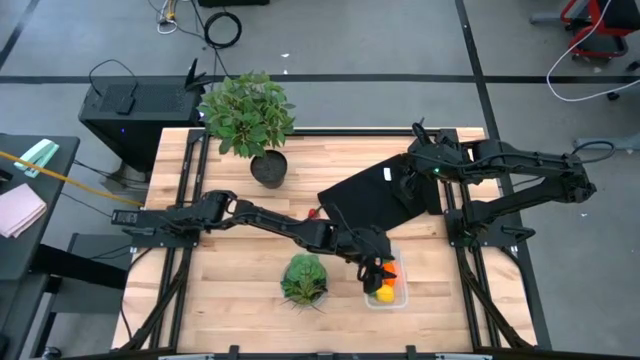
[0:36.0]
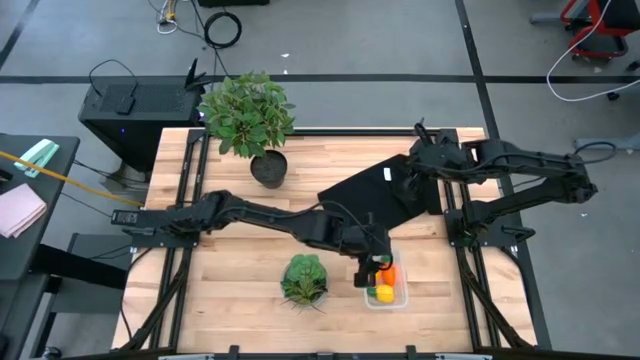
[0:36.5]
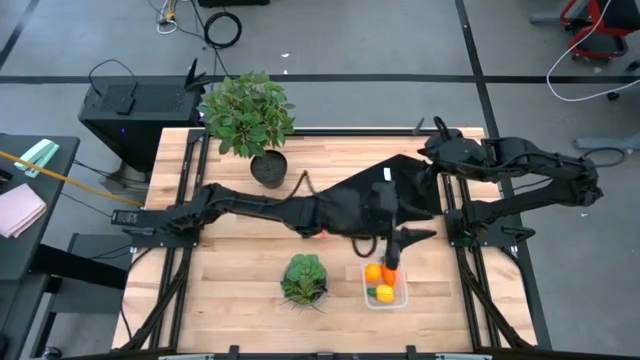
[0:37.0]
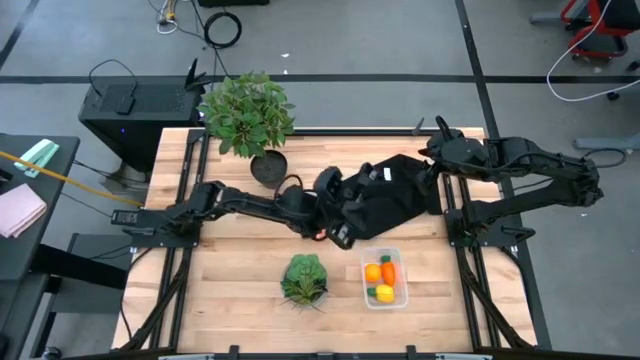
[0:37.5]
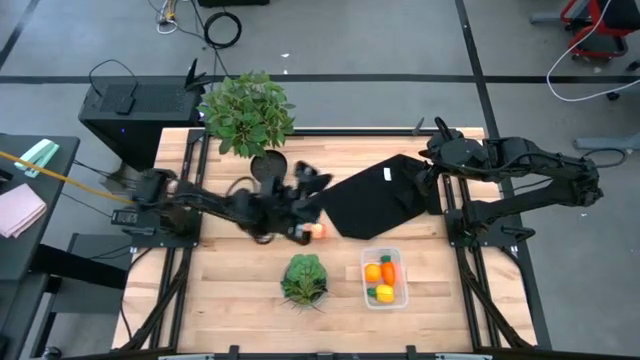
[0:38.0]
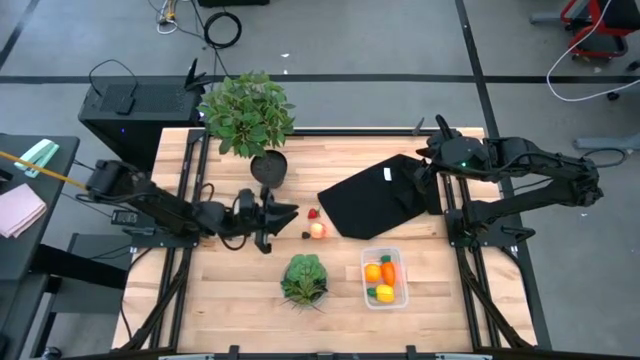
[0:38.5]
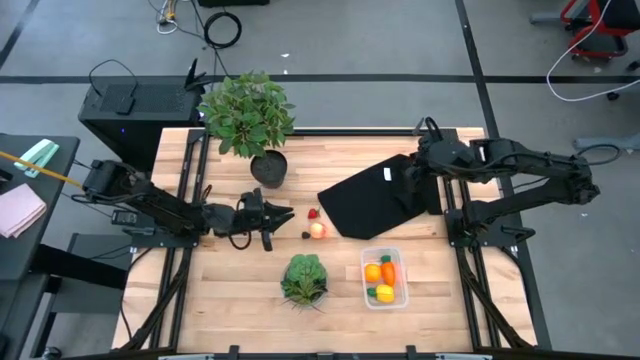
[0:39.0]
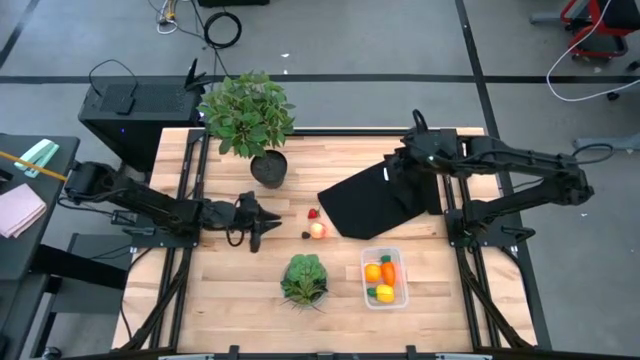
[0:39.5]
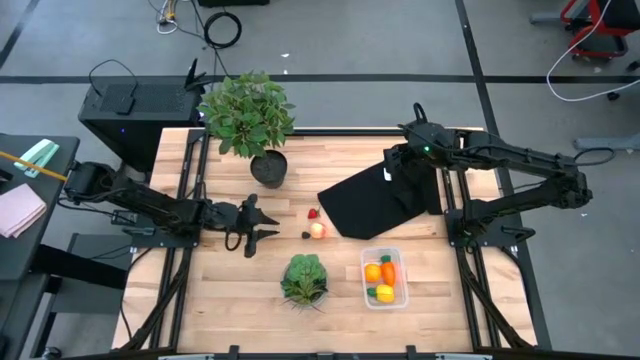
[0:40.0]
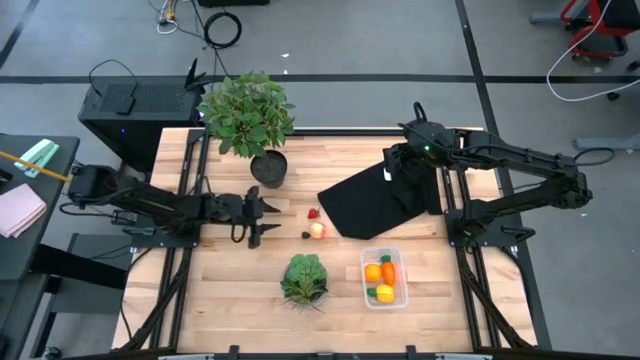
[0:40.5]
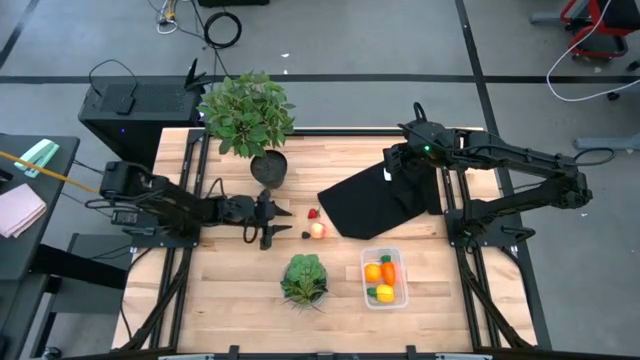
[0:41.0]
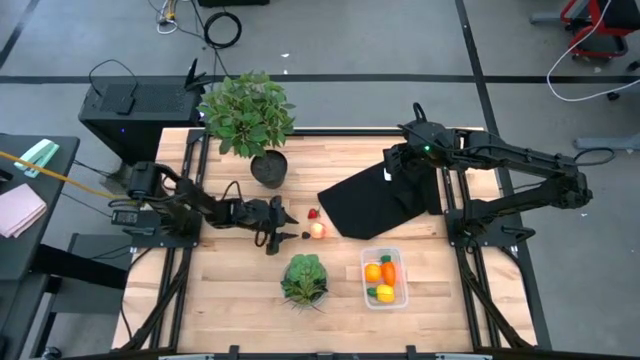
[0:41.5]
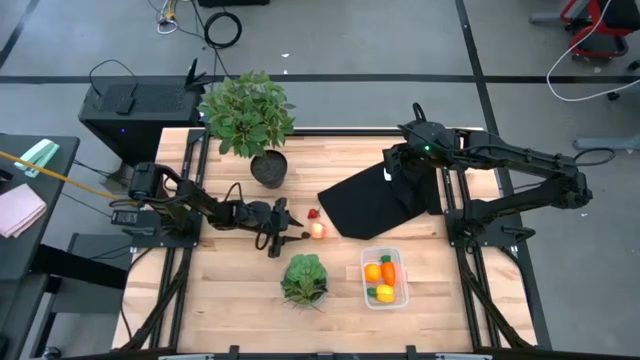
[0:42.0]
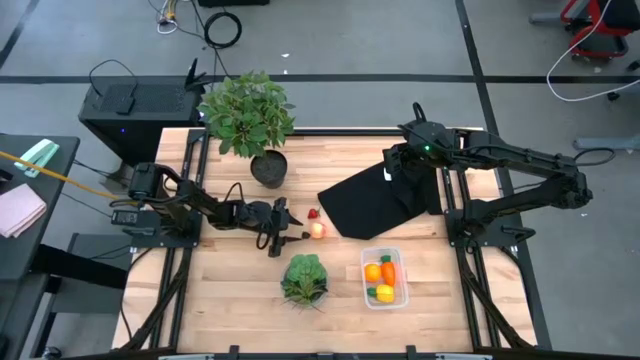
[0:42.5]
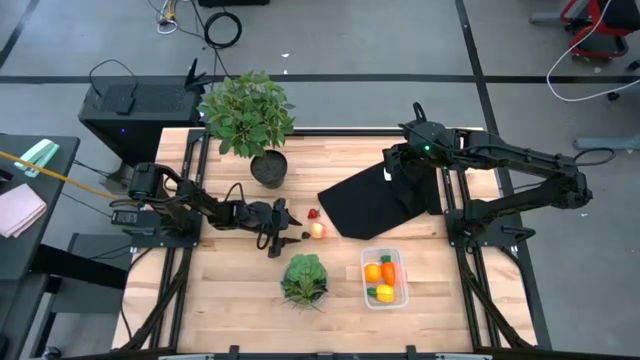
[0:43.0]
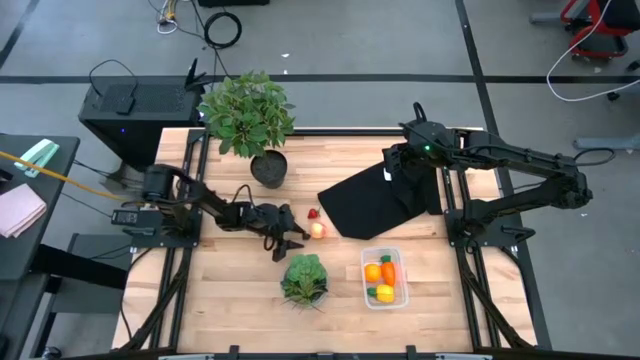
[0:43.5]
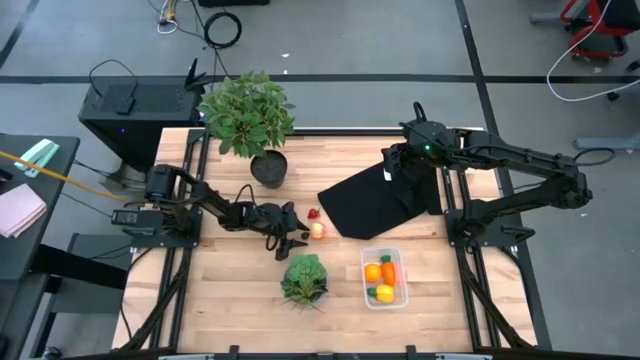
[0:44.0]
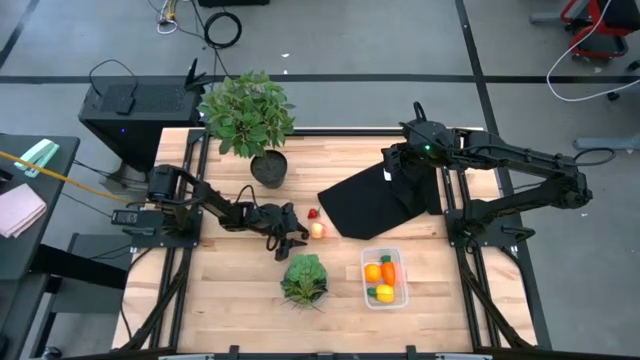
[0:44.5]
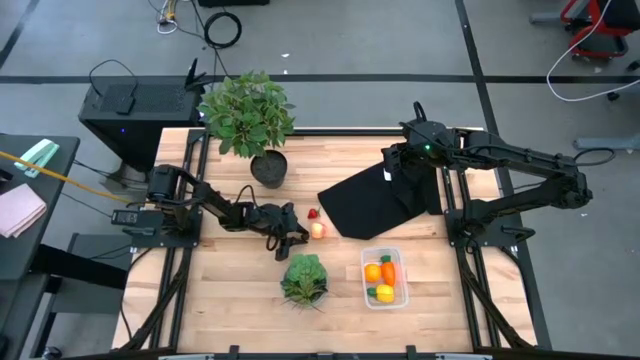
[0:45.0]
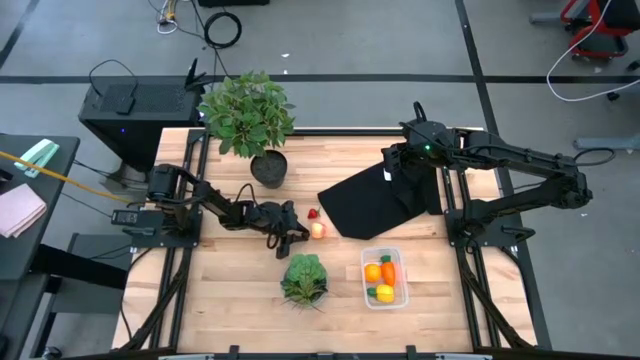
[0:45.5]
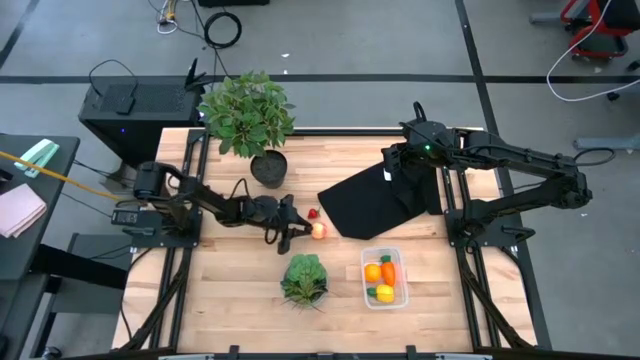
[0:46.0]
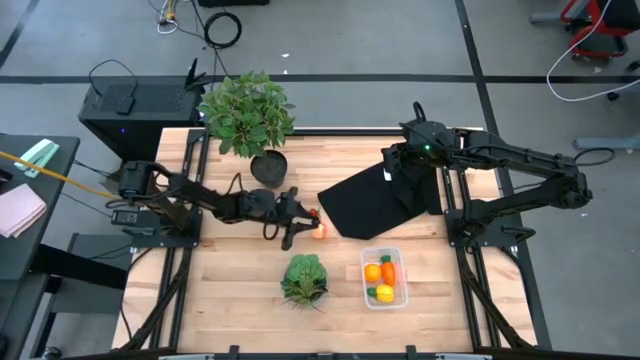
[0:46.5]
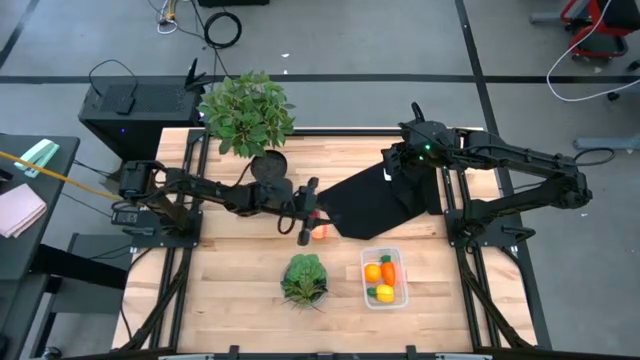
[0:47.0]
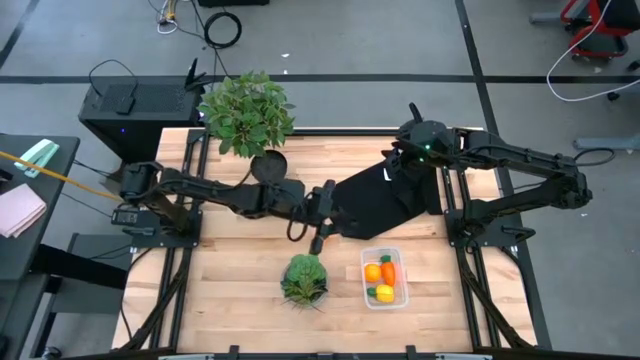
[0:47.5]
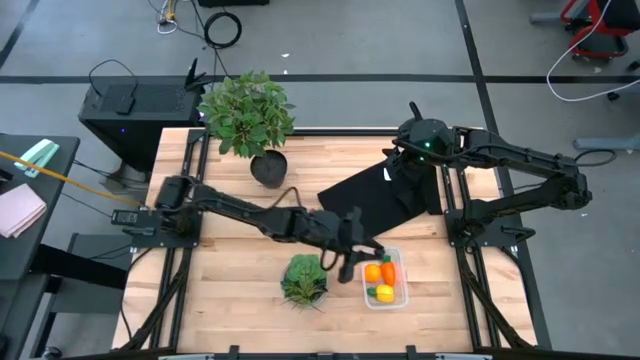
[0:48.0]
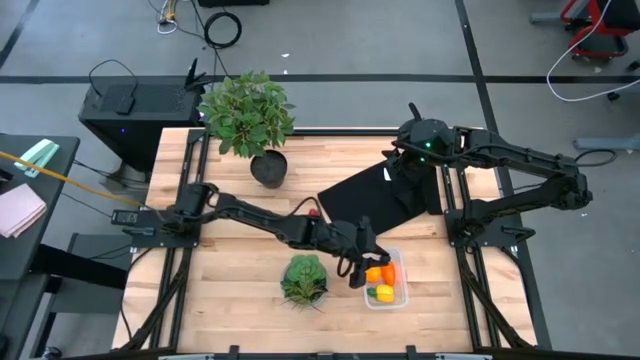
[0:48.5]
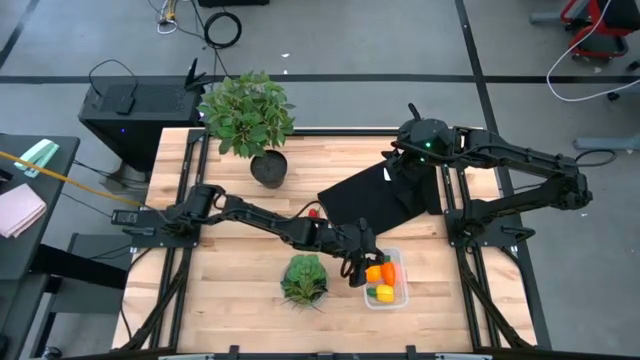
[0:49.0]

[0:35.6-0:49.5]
Task: Pick and placing Produce into tupperware
Put the blackberry into the transparent bin

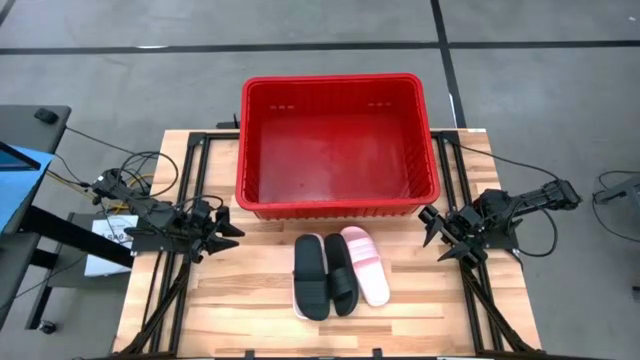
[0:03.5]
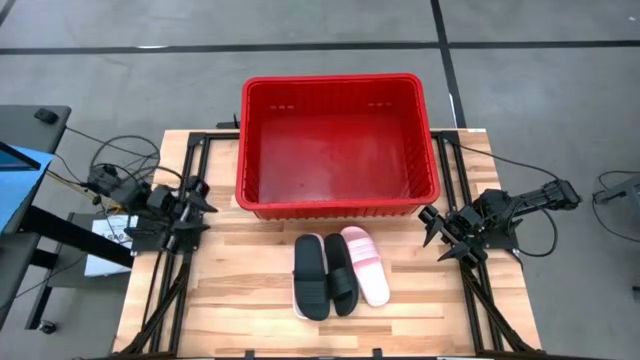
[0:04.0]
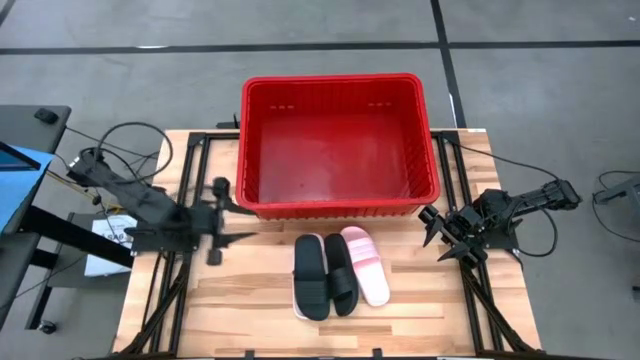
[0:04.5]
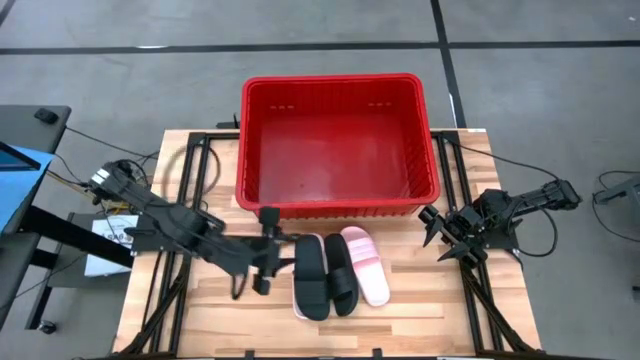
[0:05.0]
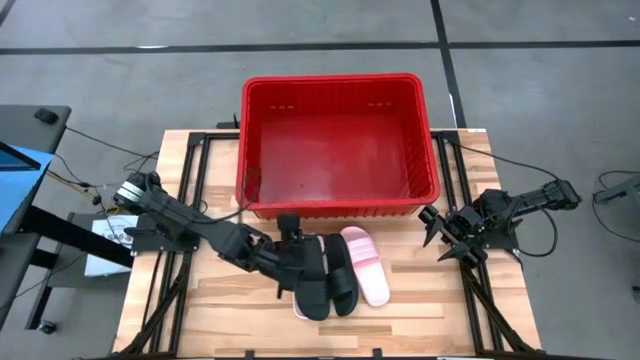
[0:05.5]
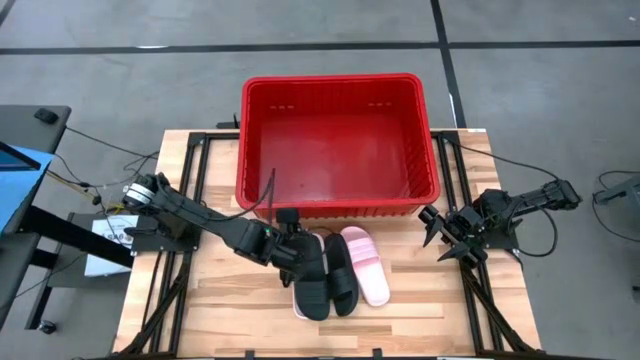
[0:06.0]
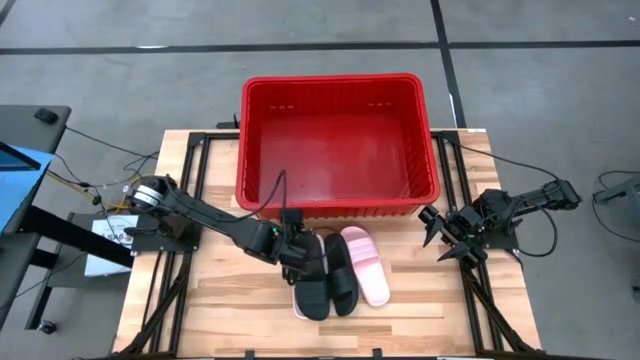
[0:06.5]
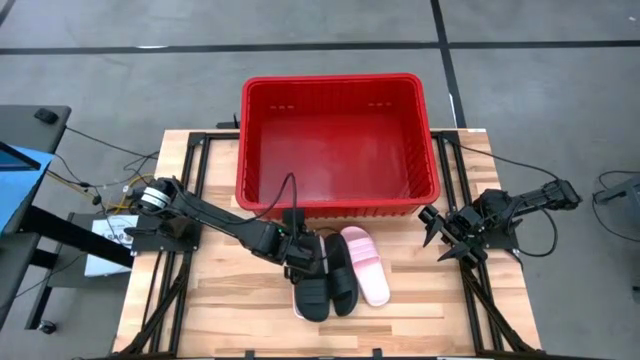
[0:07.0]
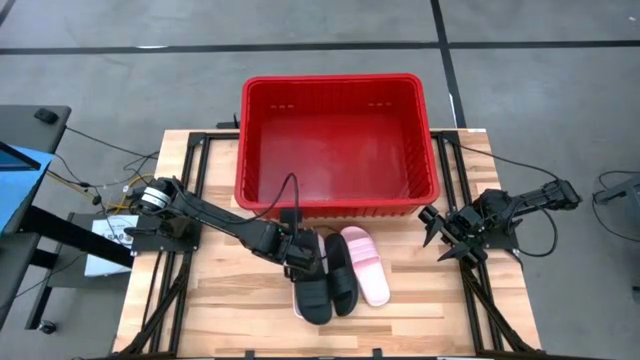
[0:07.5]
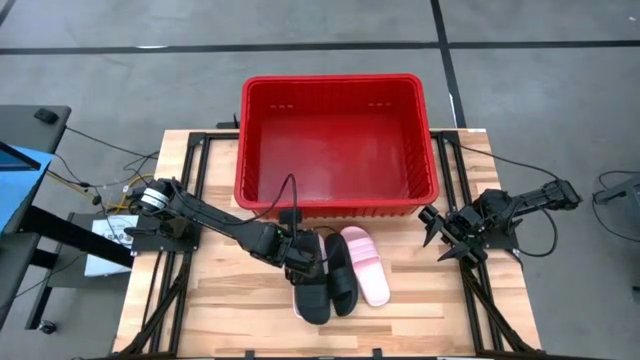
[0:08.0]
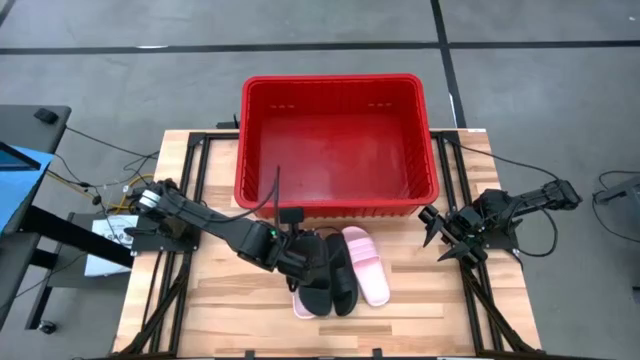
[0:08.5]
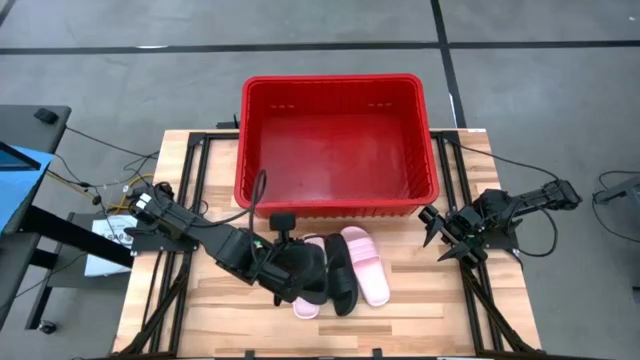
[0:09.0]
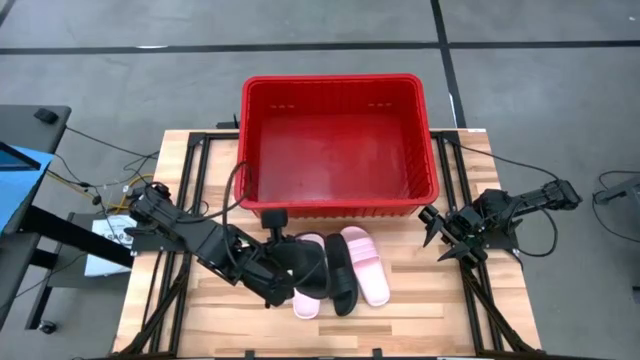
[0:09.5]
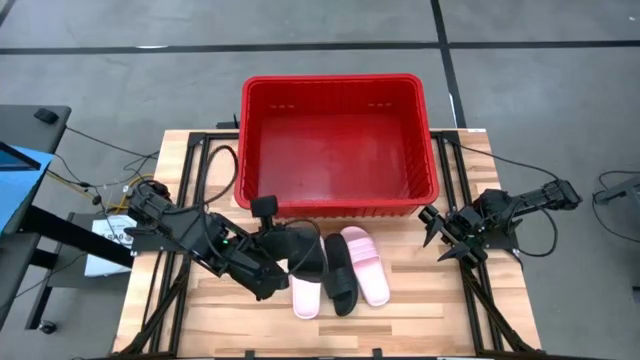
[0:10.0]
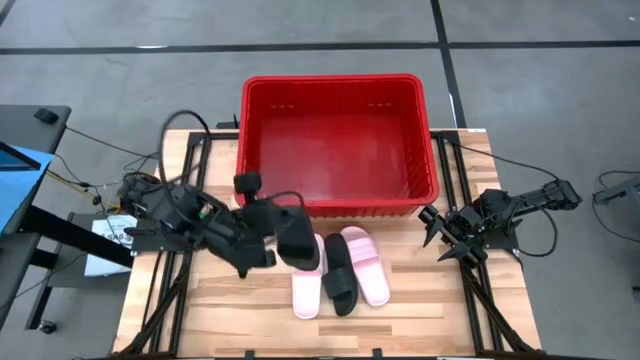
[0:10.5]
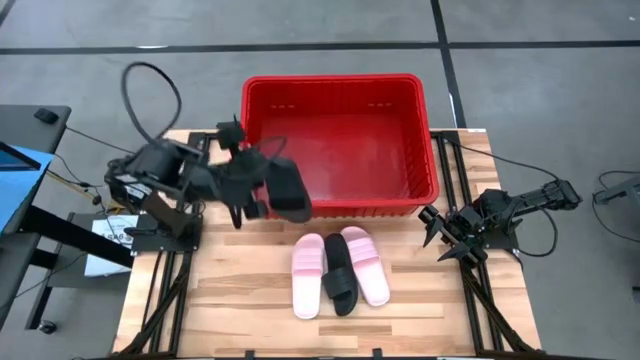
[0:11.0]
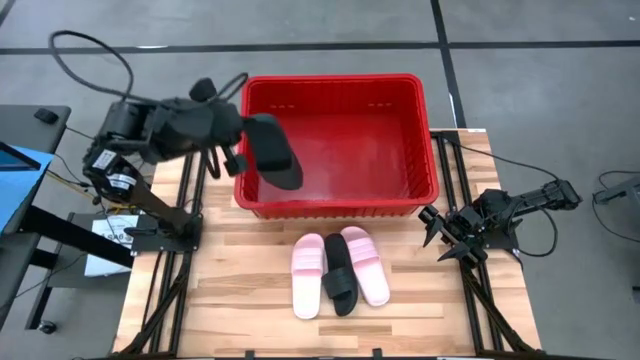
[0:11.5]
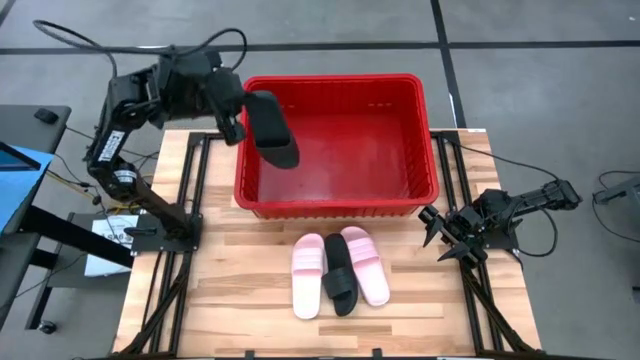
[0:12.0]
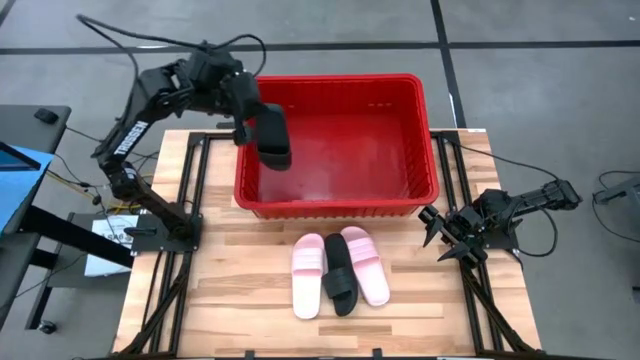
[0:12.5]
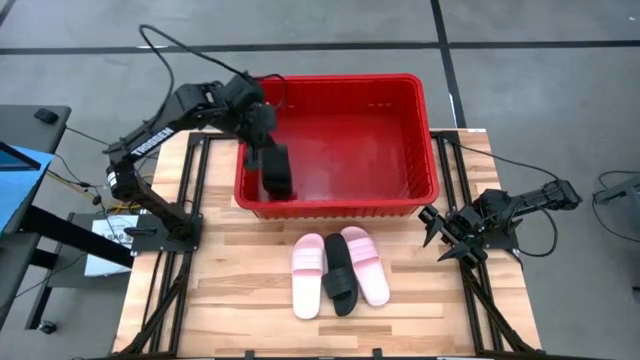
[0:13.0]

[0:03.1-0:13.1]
Task: Pick and place slides into bin
Put the left black slide into the red bin
